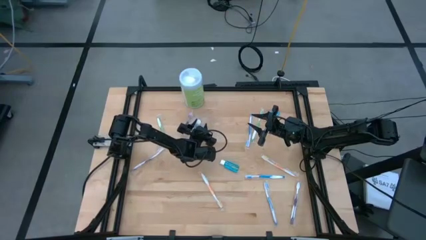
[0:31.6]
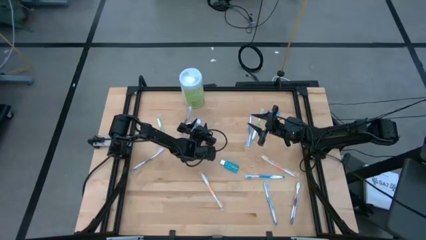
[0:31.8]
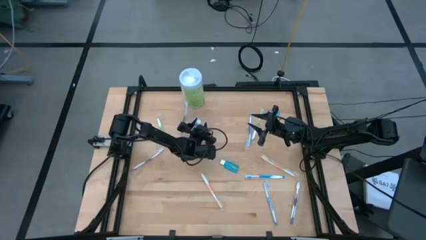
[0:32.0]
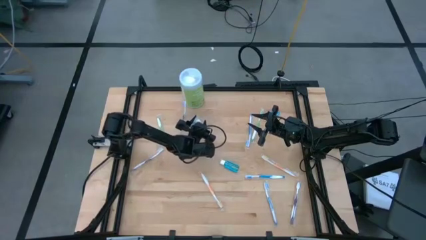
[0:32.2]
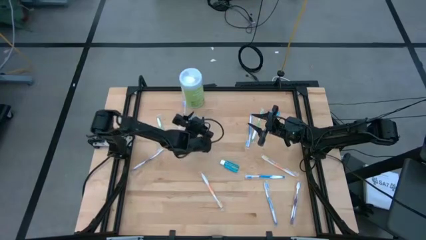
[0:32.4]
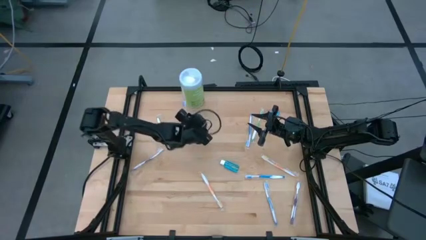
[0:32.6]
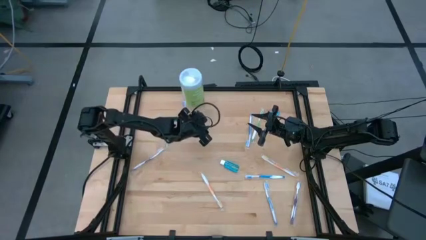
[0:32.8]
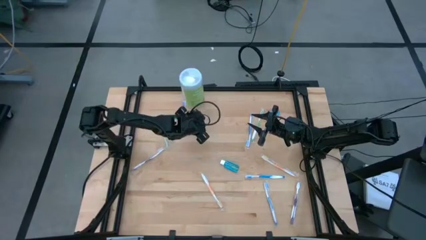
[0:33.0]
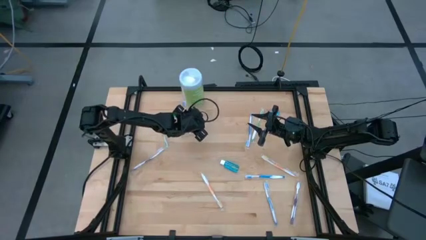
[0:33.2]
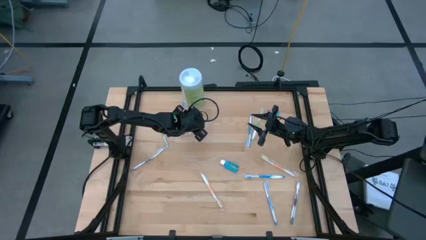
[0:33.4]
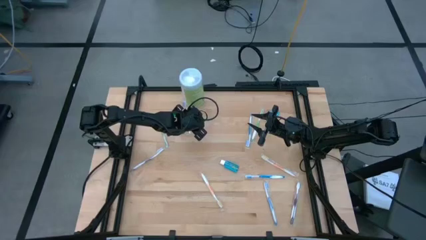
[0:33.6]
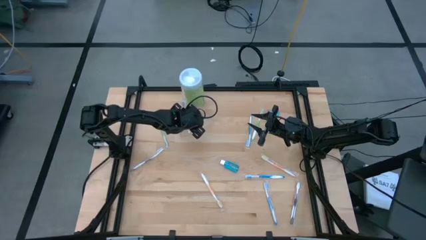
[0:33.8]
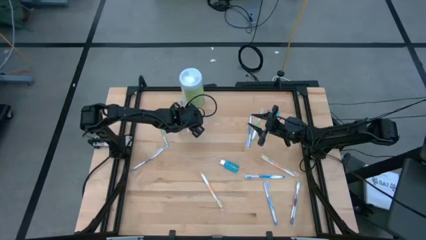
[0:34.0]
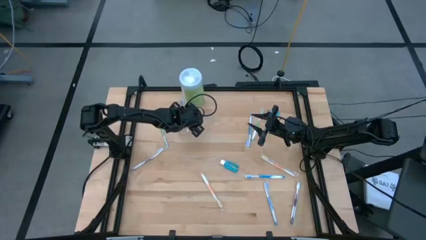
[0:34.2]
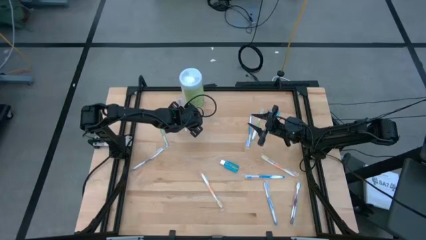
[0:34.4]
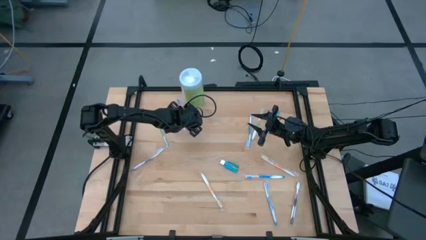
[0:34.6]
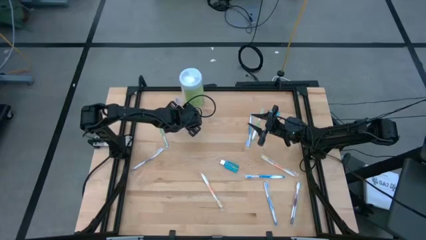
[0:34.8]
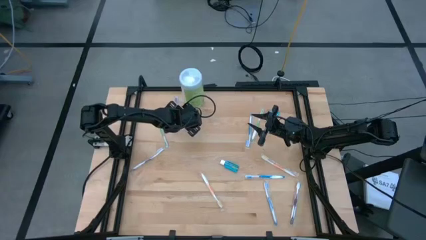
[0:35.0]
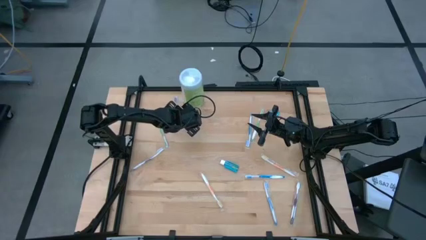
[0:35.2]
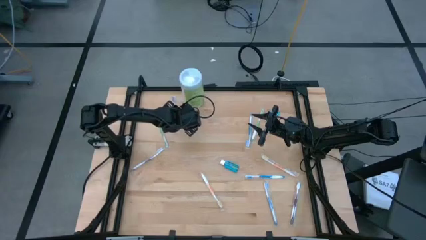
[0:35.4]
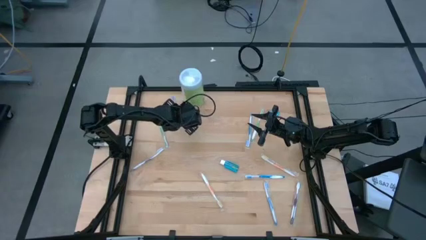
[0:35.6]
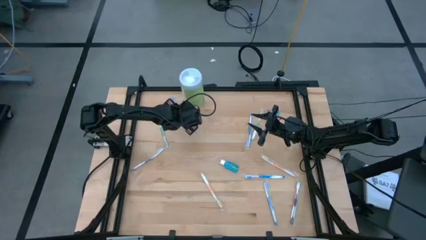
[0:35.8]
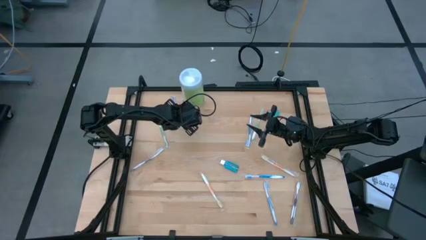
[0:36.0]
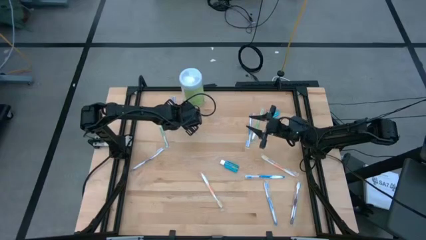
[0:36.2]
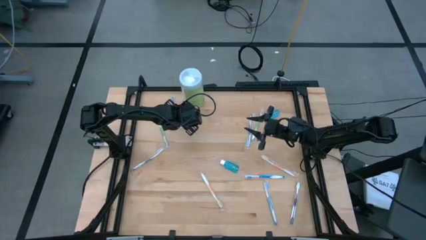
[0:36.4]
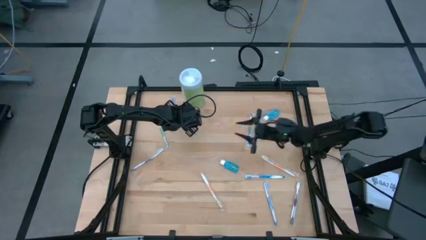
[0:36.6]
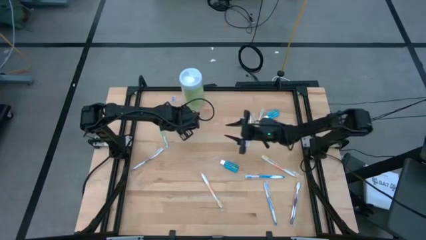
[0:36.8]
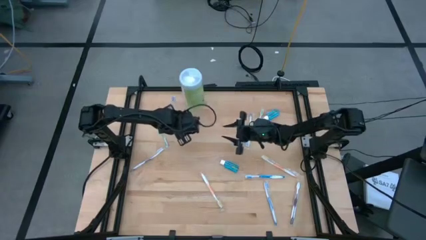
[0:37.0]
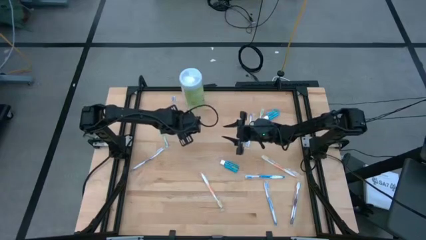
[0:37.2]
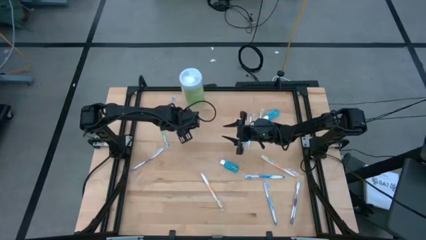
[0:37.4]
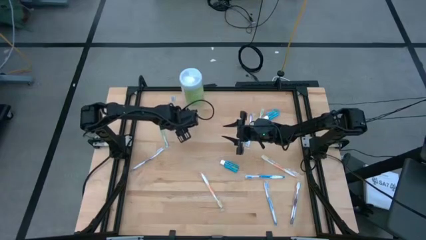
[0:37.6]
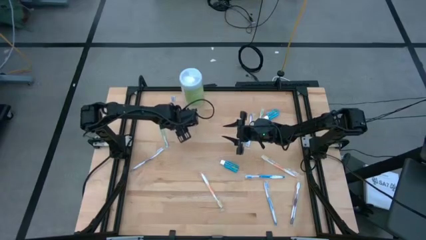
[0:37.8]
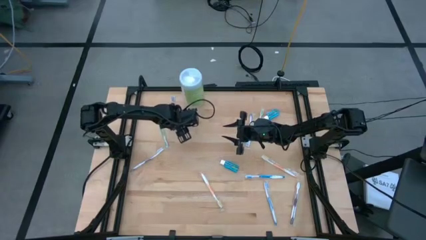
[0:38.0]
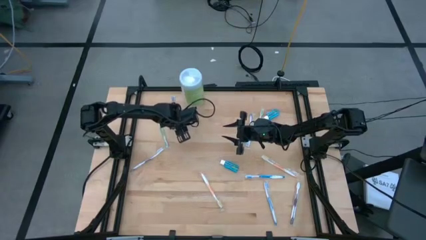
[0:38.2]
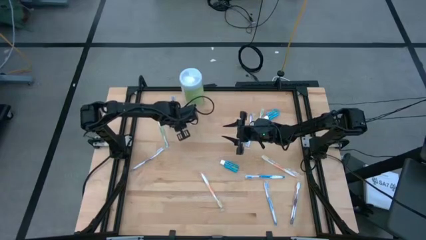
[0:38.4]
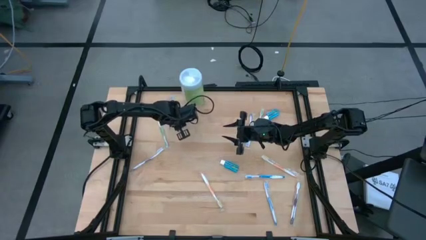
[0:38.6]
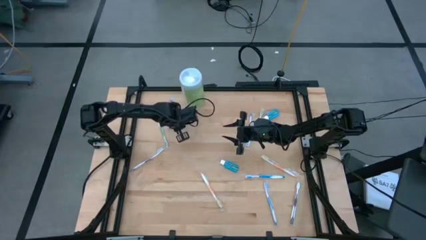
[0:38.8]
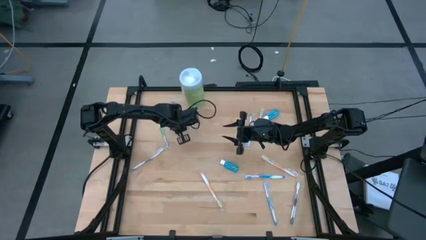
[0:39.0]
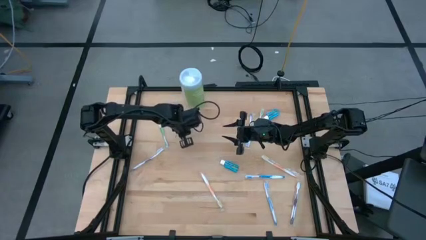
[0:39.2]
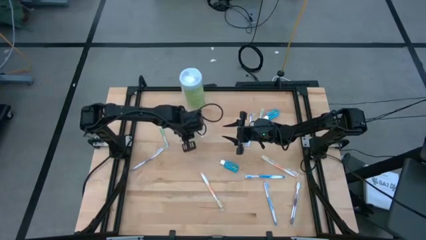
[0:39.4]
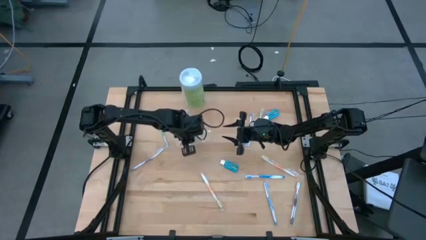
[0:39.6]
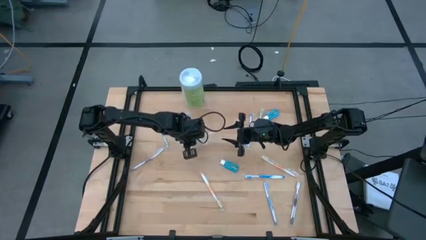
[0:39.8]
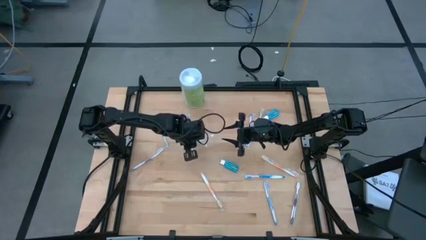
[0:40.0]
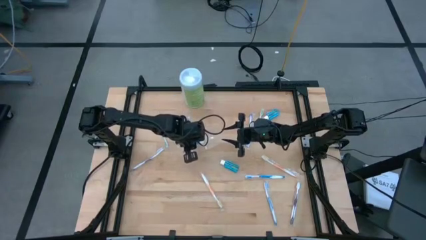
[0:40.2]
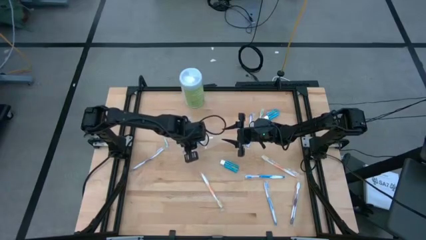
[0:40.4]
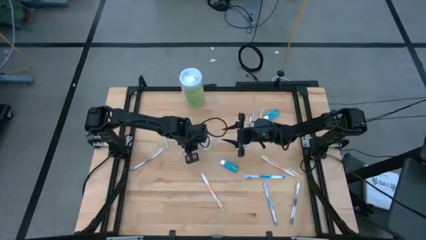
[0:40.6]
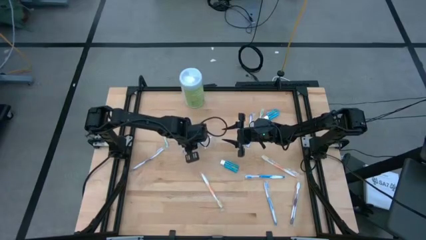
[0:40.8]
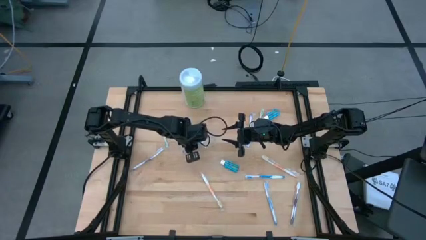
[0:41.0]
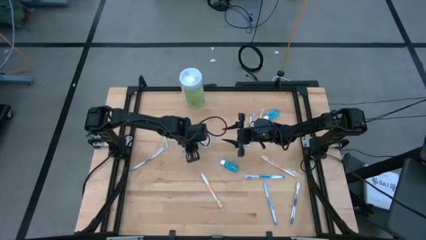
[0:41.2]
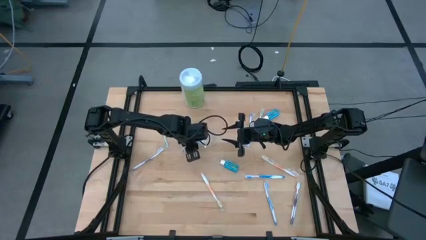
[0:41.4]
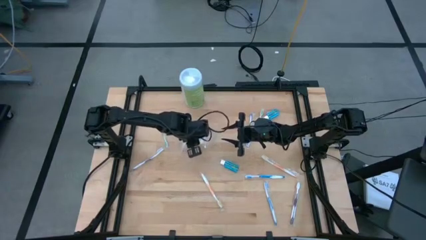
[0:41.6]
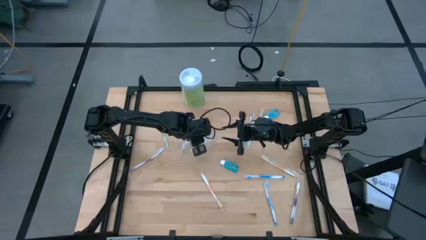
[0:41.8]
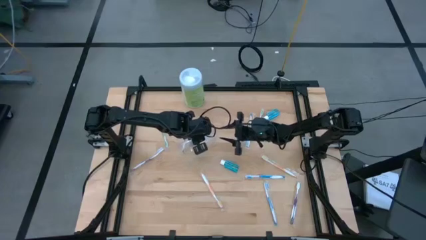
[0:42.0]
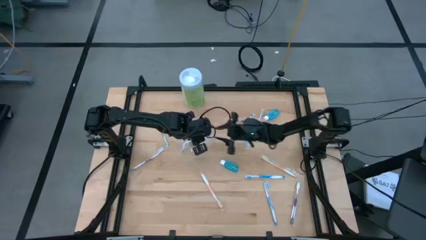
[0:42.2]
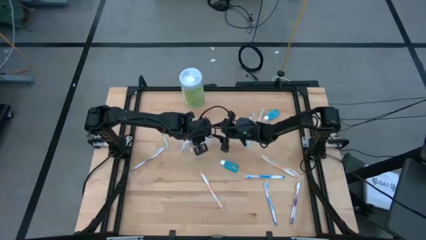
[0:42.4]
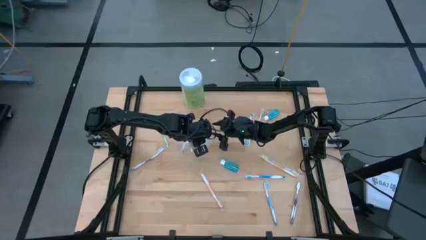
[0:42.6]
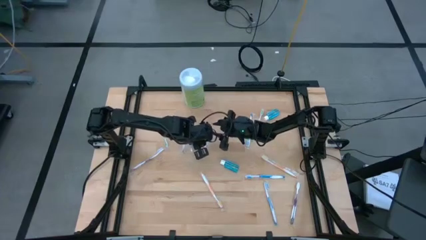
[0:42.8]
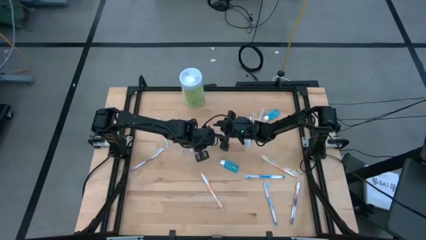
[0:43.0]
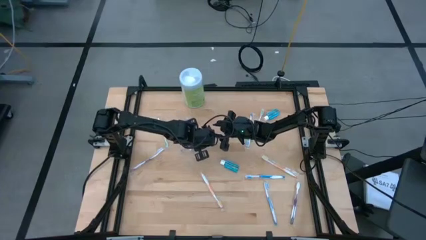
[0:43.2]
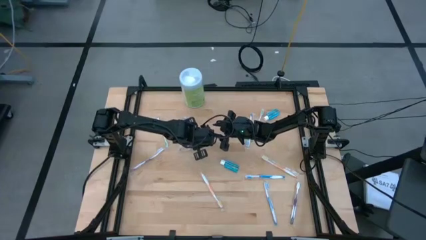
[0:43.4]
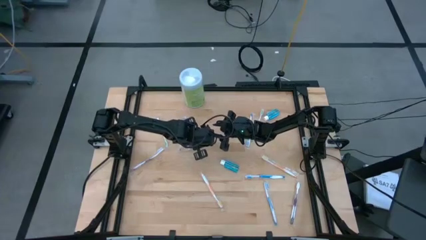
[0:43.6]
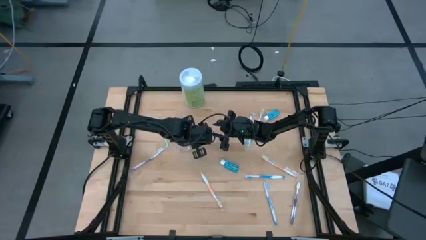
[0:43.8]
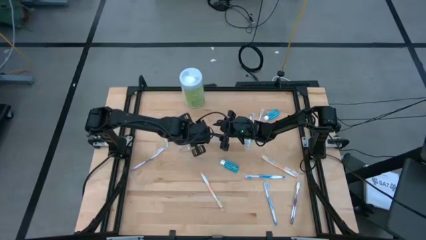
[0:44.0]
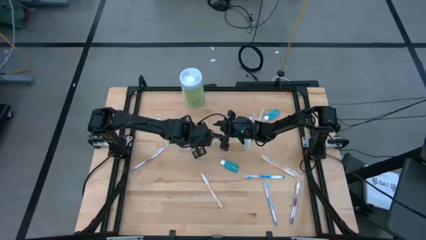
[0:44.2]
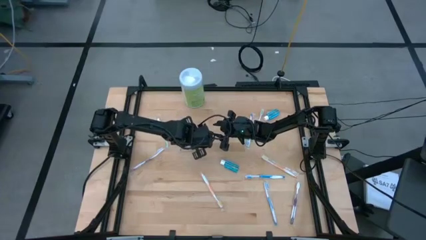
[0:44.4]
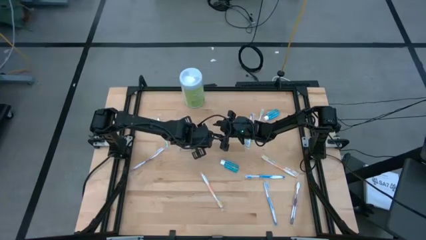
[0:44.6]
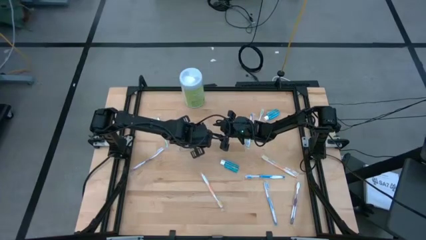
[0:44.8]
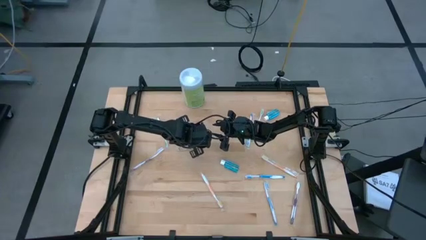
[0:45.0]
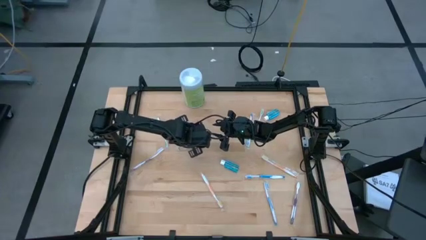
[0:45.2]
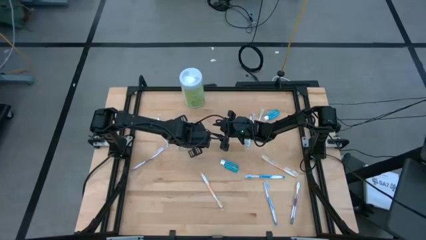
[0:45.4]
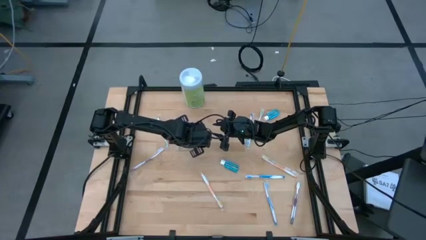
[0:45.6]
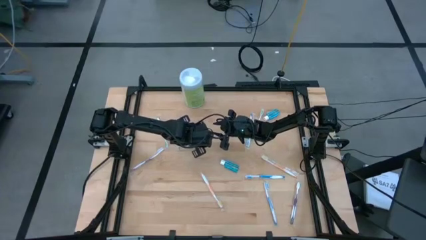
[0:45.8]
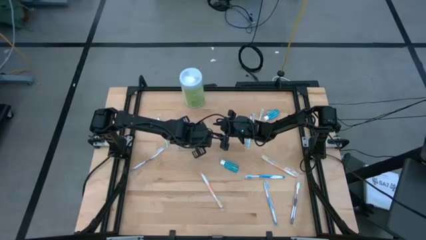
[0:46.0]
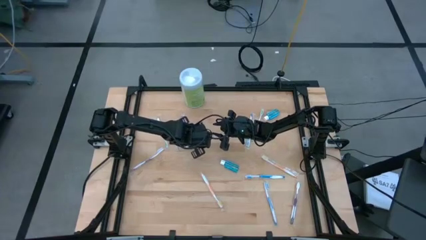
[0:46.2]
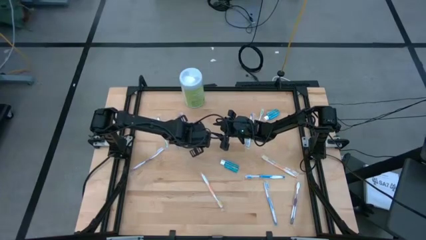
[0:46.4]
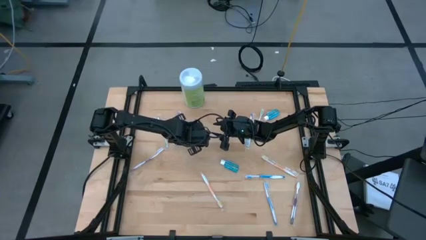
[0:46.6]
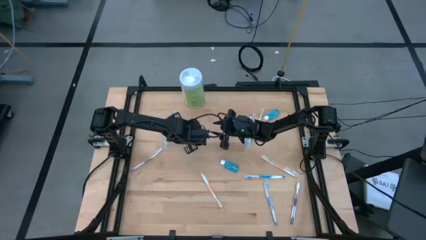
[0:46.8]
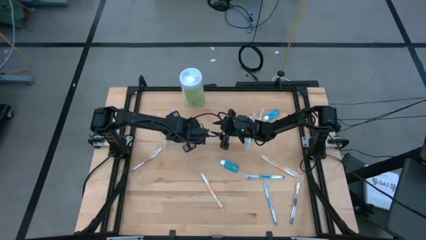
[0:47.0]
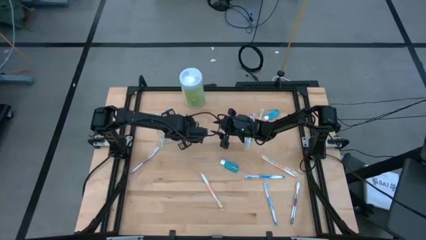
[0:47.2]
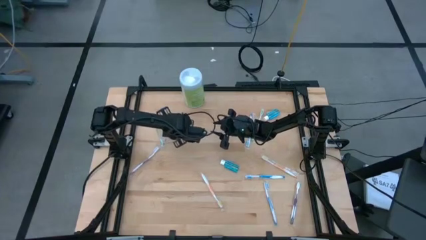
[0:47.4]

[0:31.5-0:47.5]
Task: Pick & Place toothbrushing station
Adjust the blue mouthwash
